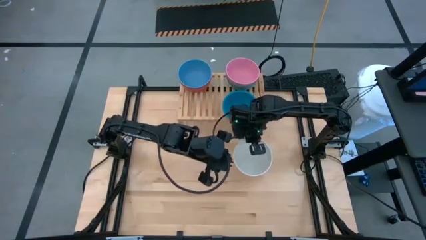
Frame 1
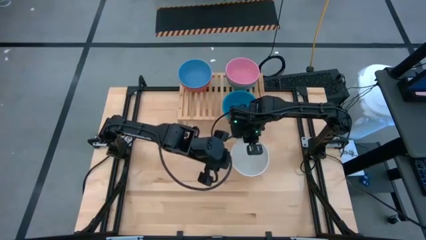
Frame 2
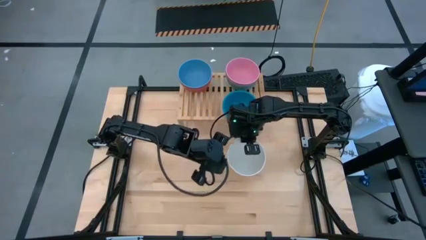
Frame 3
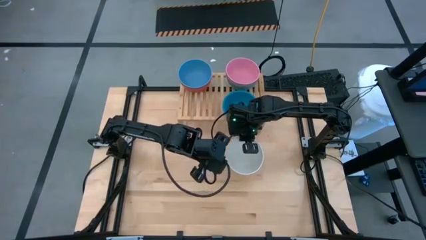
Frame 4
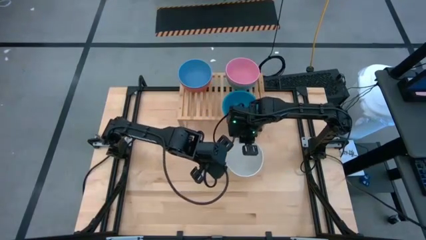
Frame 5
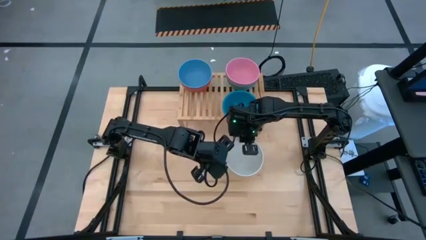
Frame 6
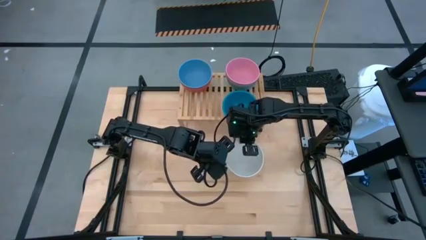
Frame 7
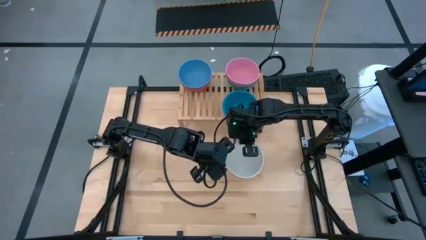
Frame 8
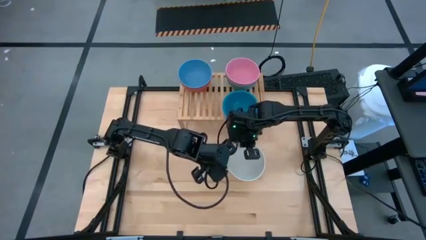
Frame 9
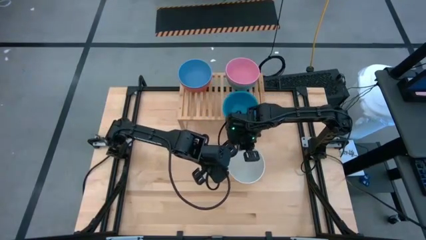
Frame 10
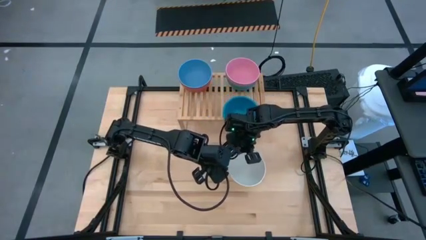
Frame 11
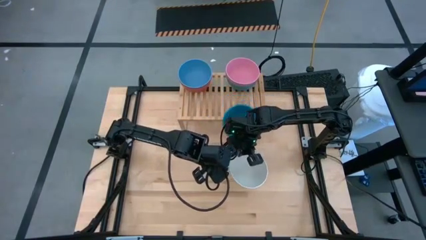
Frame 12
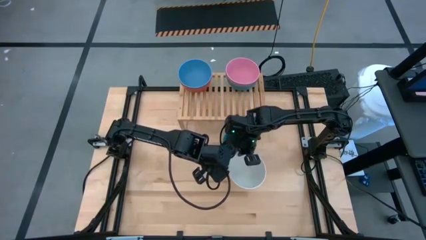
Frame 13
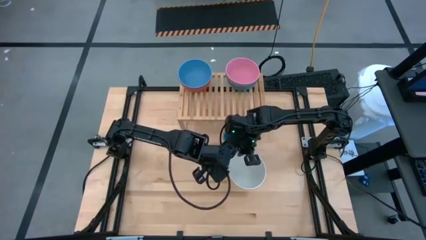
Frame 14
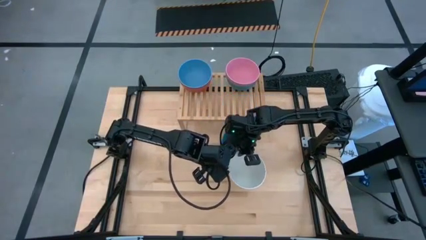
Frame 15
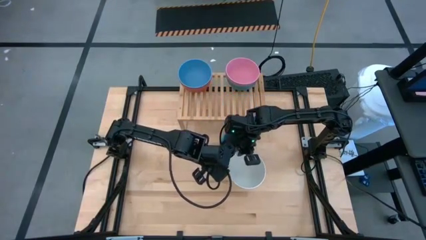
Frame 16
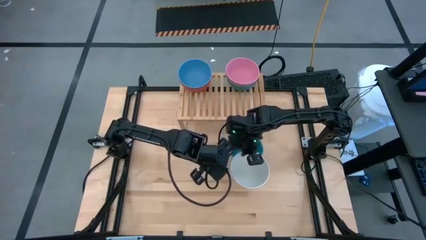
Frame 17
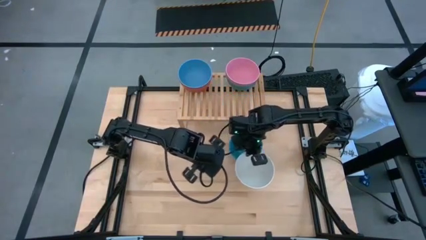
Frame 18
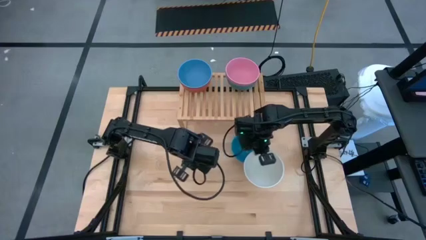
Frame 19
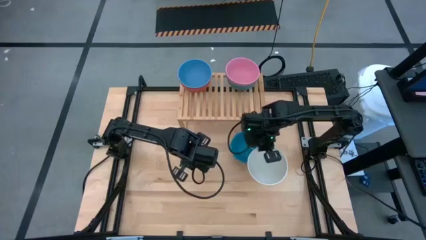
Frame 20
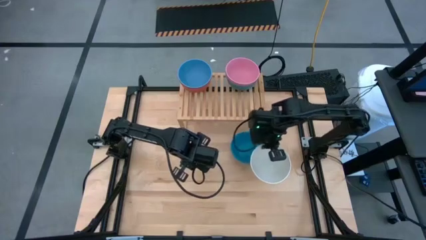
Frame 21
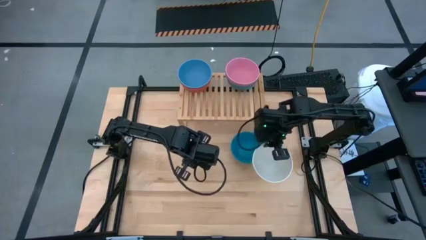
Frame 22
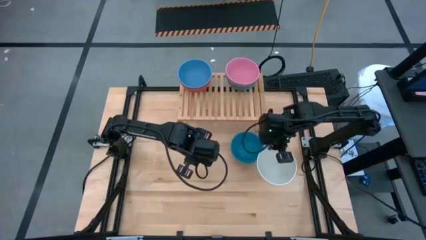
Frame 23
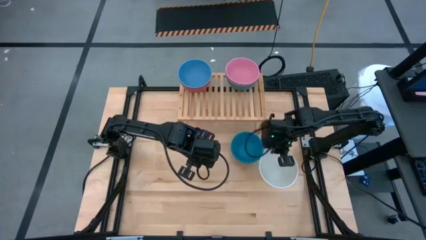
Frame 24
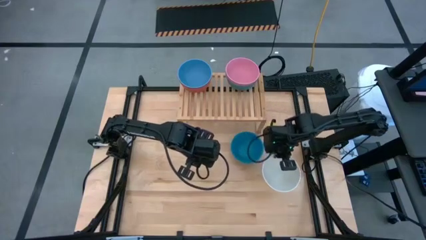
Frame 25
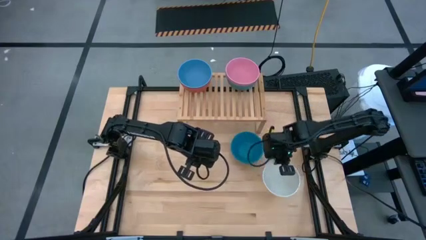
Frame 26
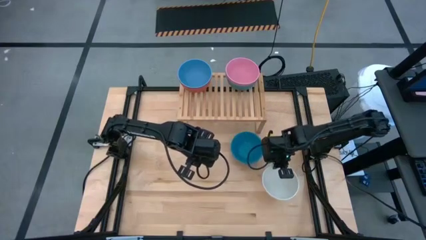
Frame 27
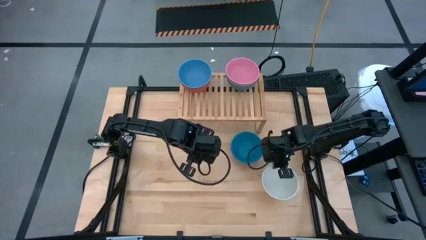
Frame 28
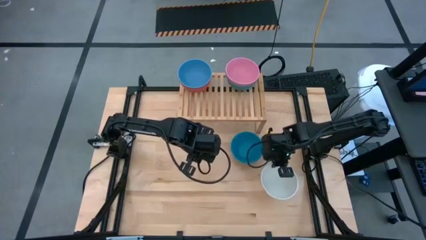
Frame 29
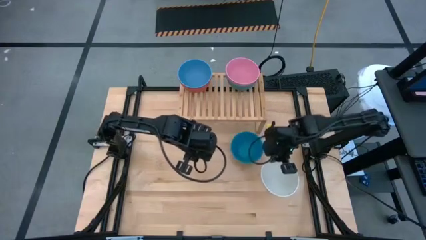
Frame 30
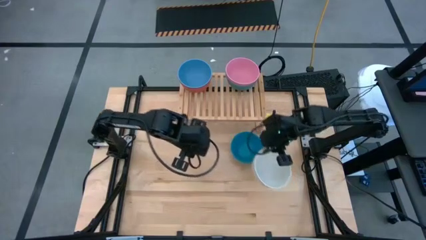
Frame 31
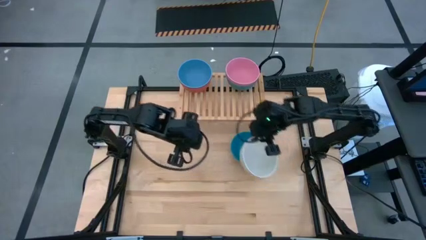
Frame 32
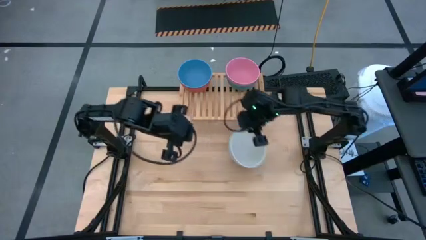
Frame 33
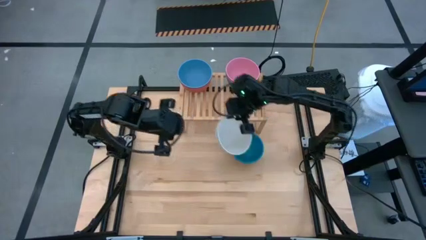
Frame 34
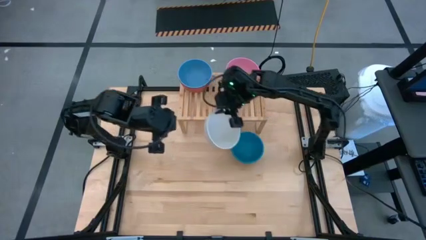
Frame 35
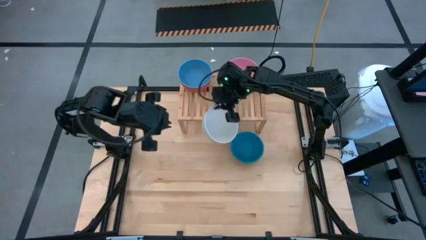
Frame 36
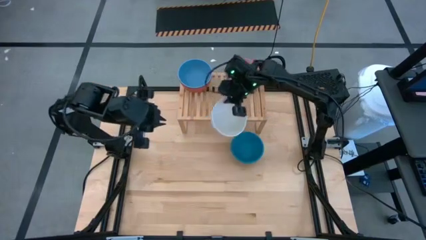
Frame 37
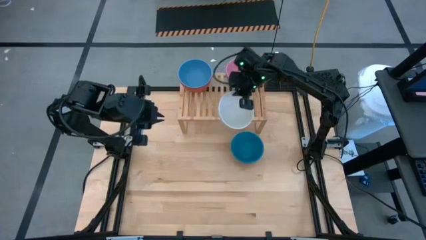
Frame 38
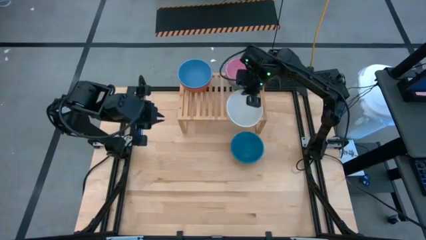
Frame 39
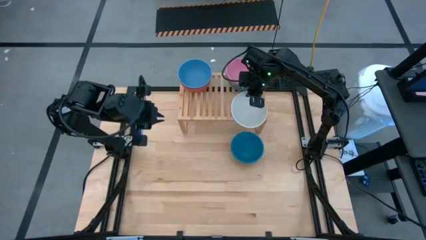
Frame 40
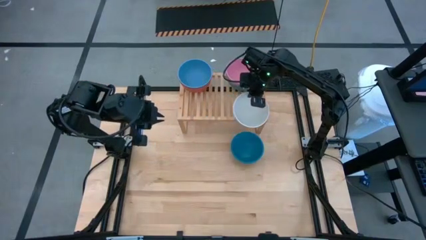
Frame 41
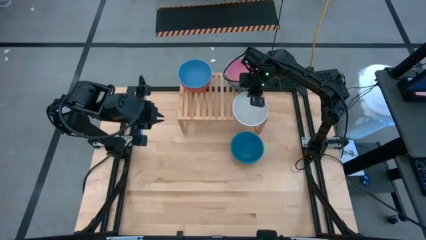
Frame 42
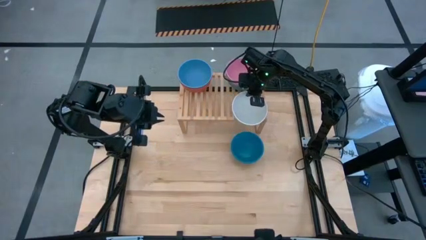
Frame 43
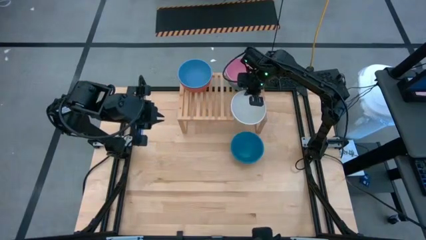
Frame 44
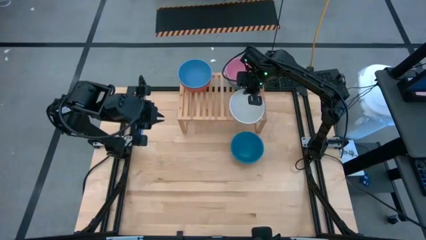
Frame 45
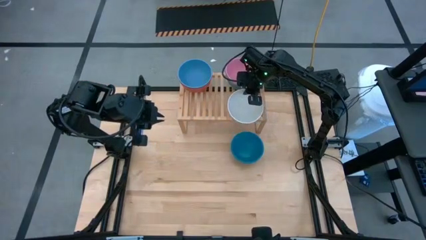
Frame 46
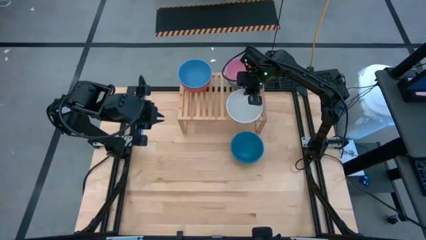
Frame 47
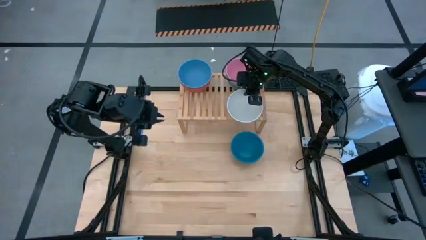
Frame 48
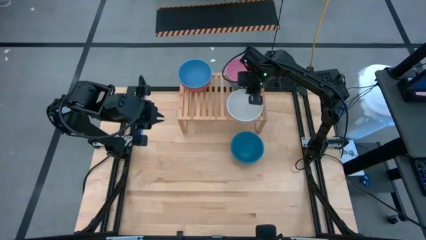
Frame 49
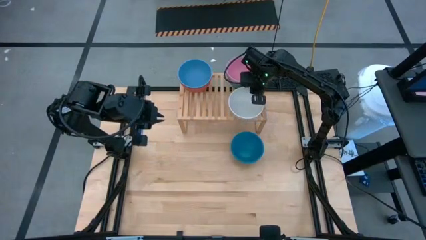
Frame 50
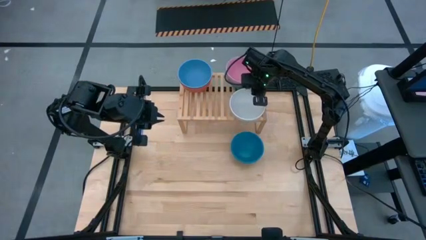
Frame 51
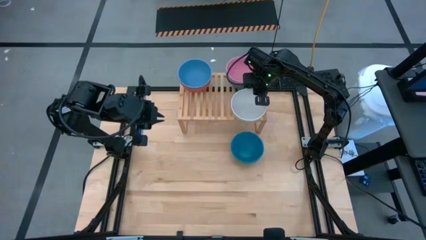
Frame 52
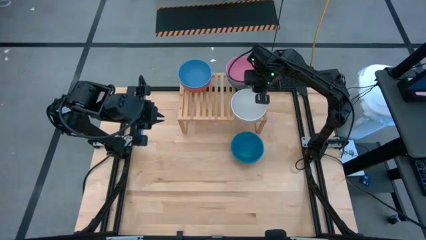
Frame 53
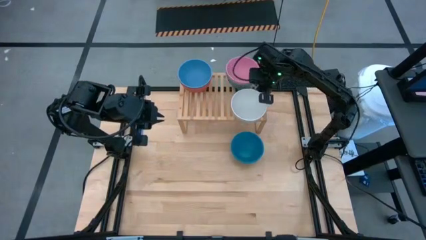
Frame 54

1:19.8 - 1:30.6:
Task: Place and stack bowls onto a shelf
Put the white bowl on the shelf

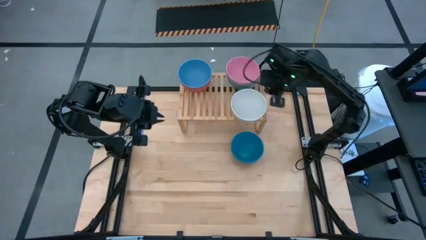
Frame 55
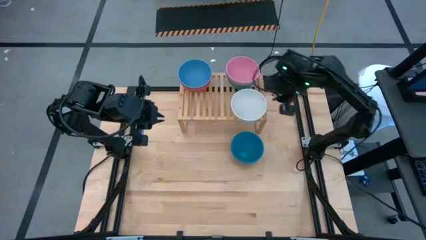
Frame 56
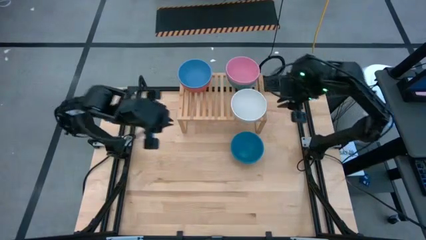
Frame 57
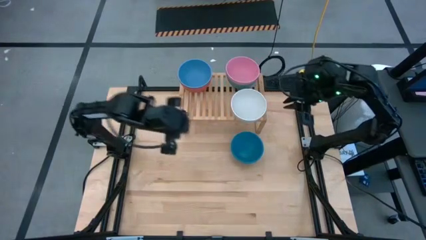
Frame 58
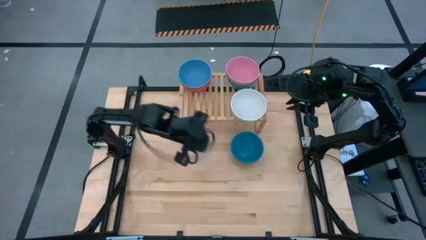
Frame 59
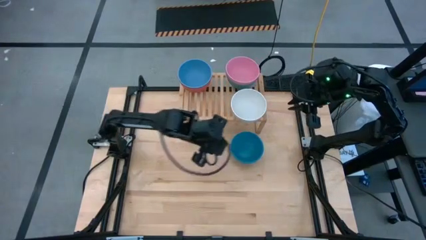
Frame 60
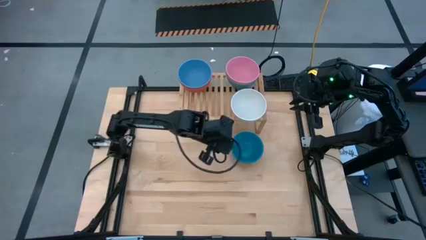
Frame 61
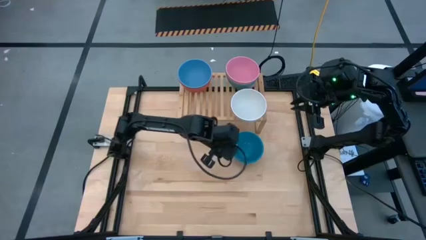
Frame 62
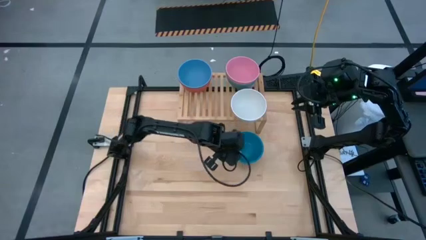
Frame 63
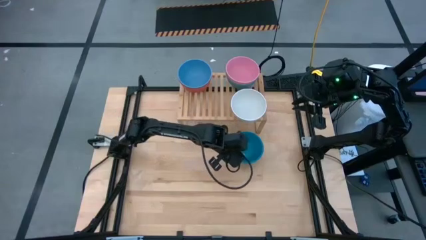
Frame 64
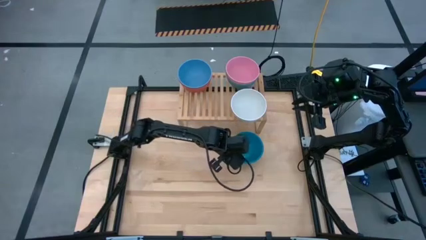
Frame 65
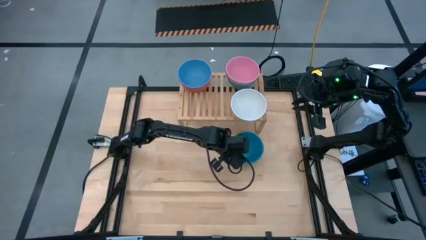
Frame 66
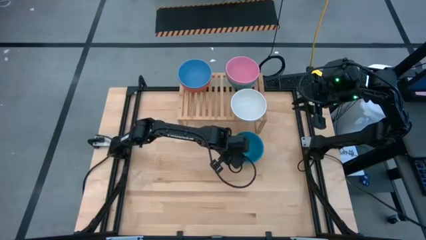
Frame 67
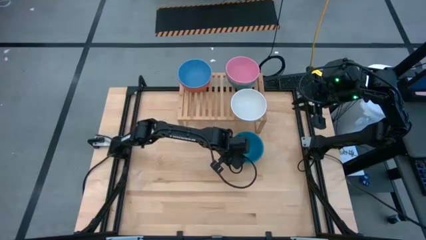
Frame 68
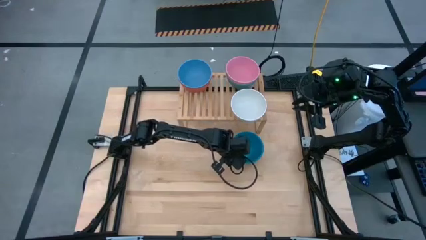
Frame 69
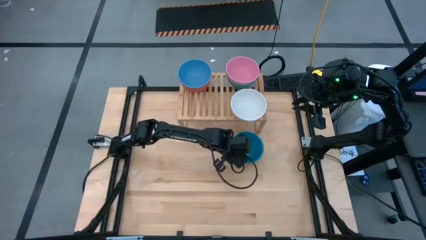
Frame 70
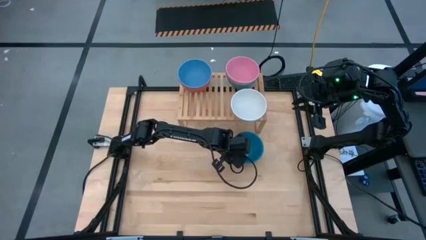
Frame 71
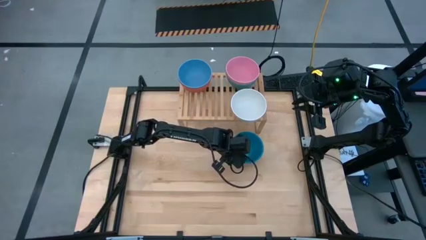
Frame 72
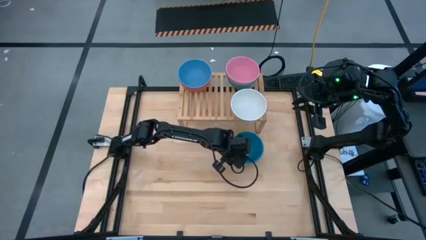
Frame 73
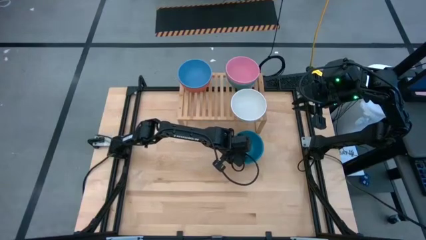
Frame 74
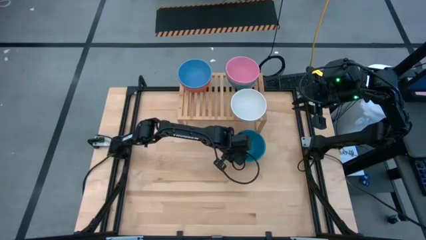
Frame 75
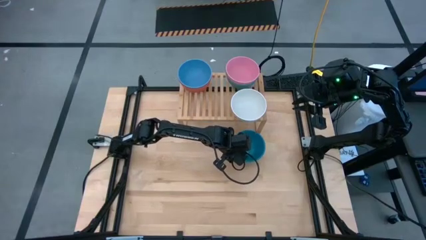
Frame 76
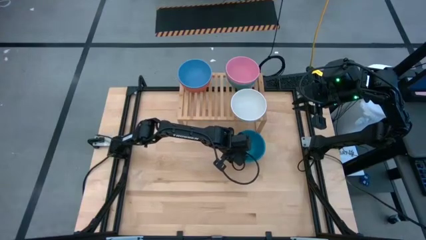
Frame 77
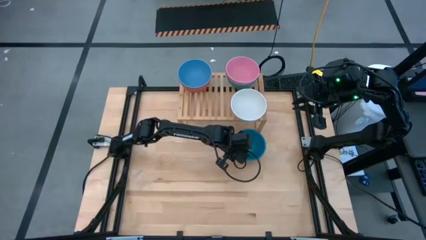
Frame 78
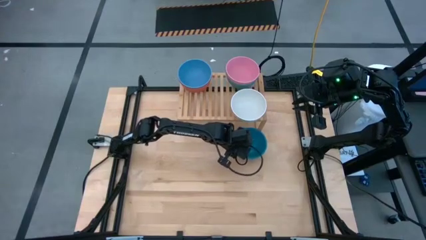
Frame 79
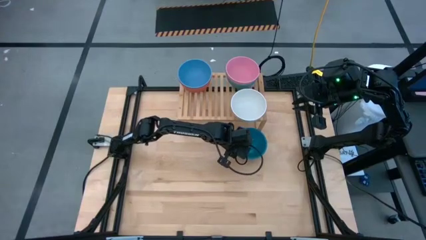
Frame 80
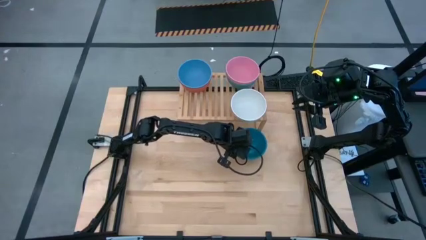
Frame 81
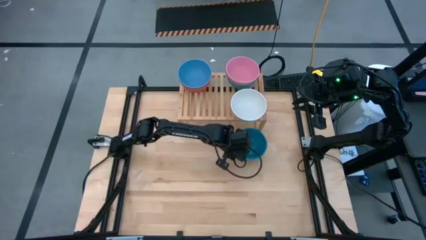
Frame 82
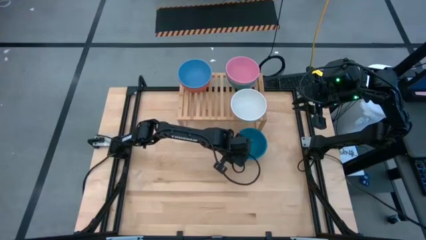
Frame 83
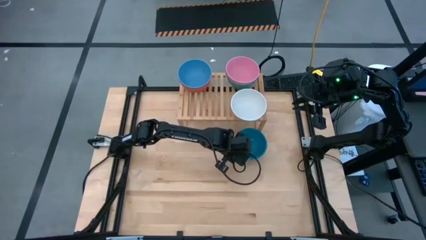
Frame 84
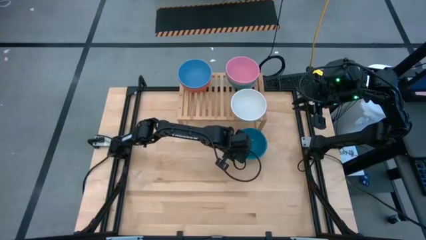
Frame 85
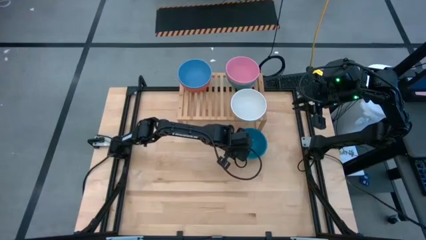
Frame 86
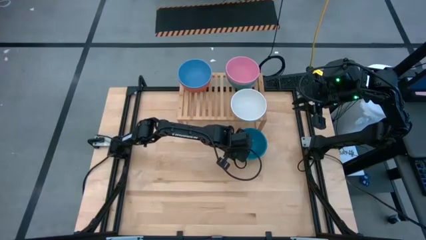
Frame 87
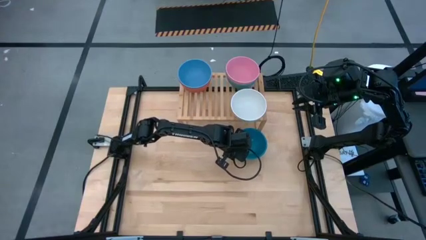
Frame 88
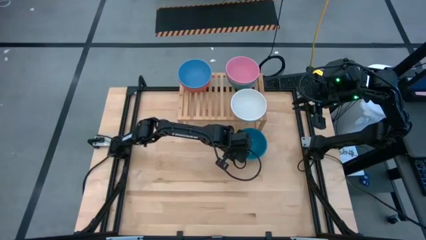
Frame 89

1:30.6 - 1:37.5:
Put the dark blue bowl on the shelf
